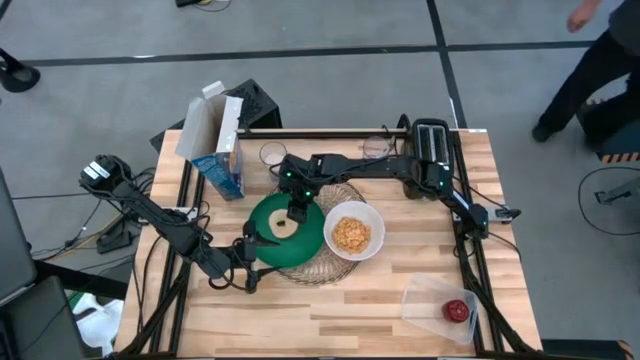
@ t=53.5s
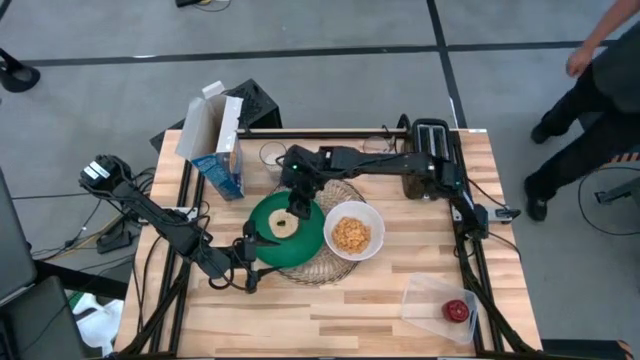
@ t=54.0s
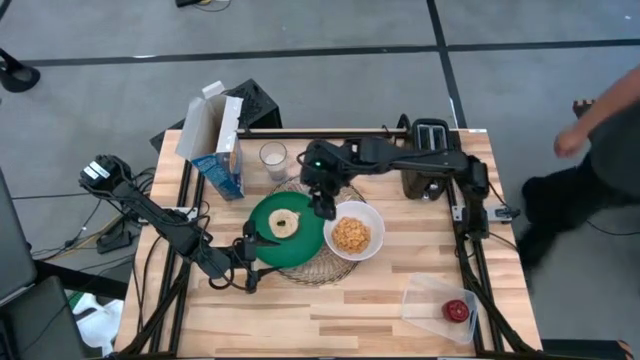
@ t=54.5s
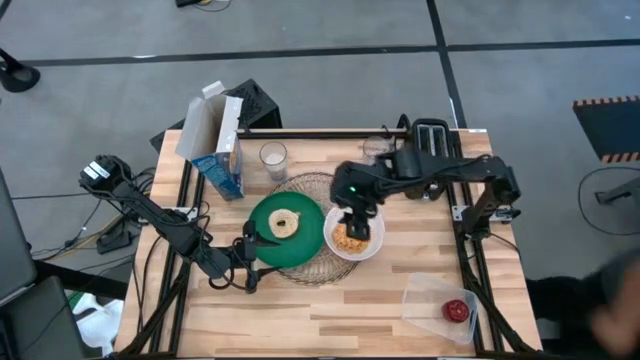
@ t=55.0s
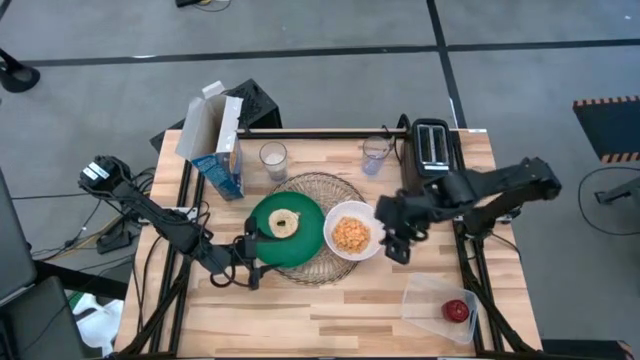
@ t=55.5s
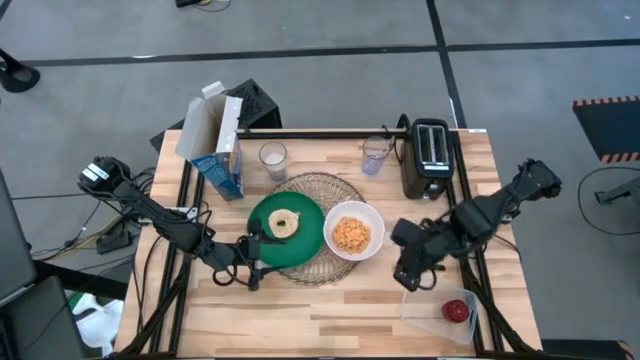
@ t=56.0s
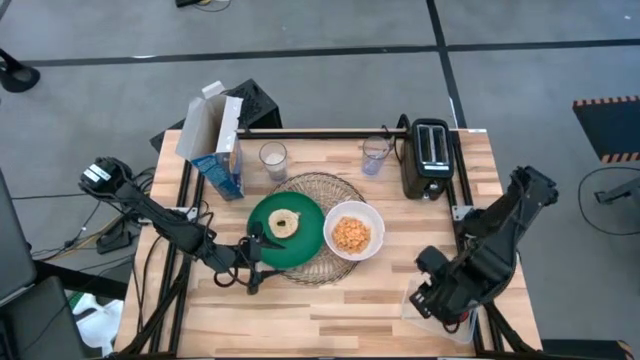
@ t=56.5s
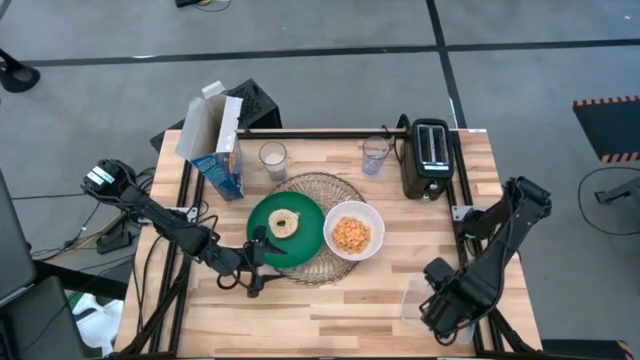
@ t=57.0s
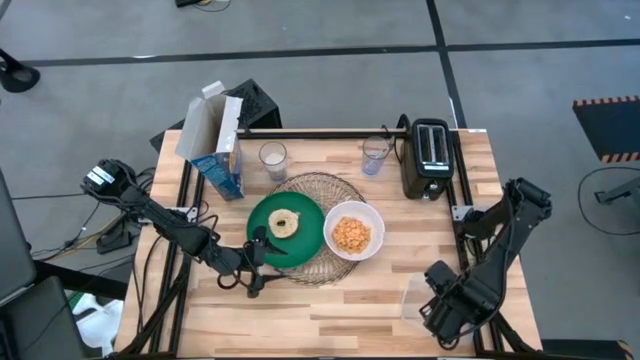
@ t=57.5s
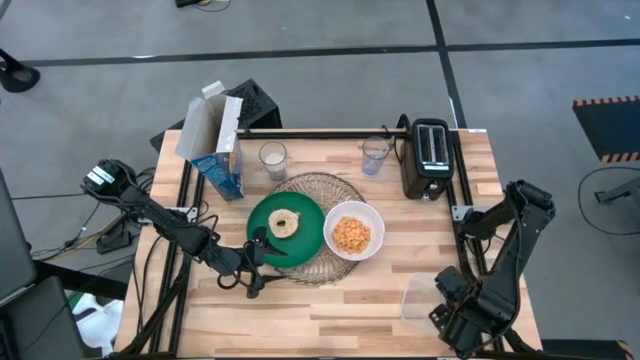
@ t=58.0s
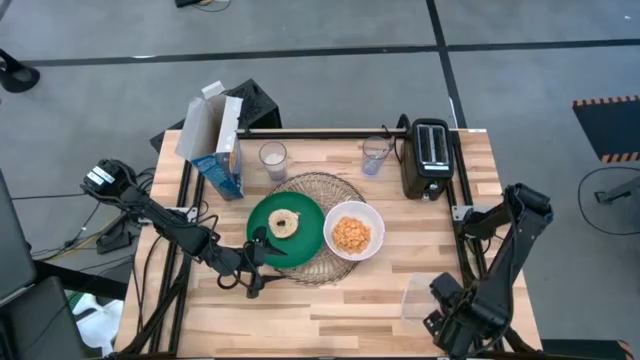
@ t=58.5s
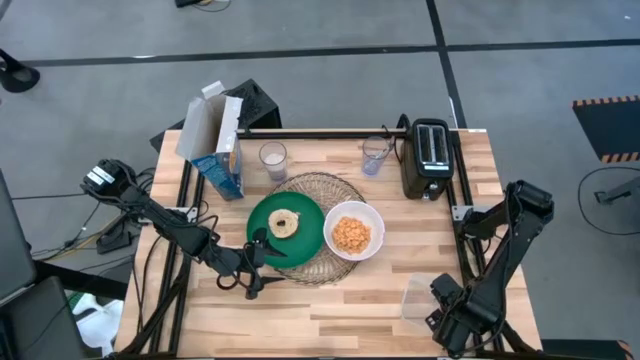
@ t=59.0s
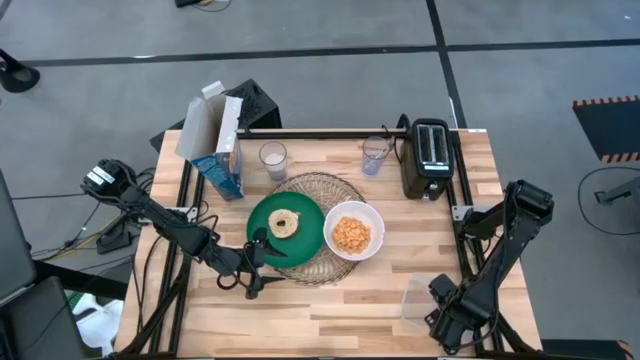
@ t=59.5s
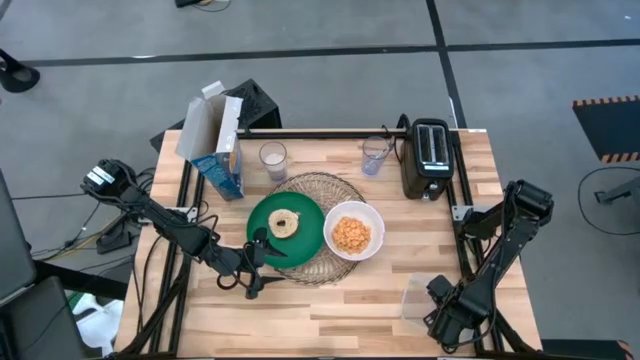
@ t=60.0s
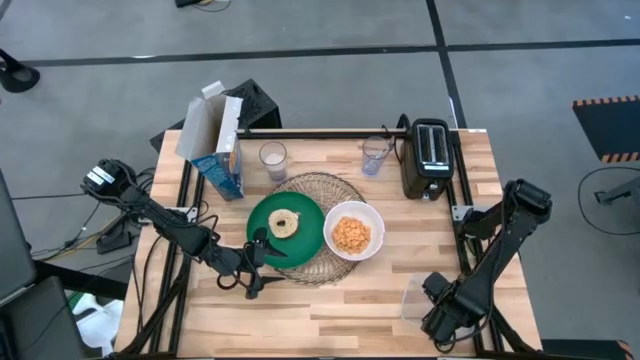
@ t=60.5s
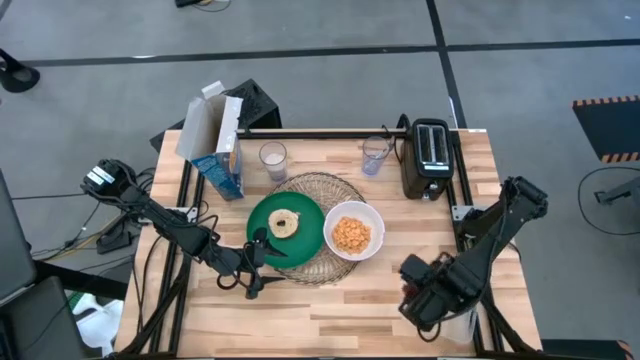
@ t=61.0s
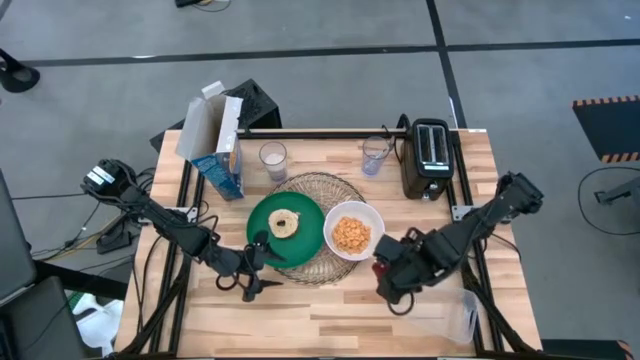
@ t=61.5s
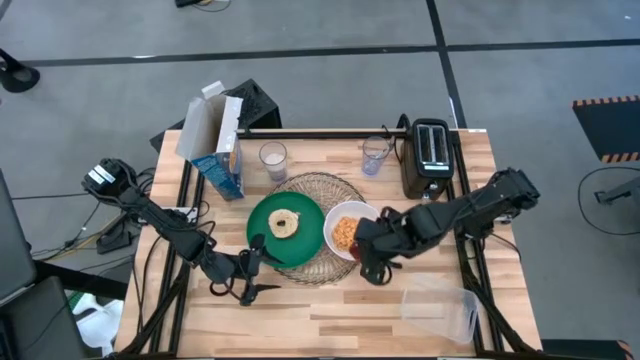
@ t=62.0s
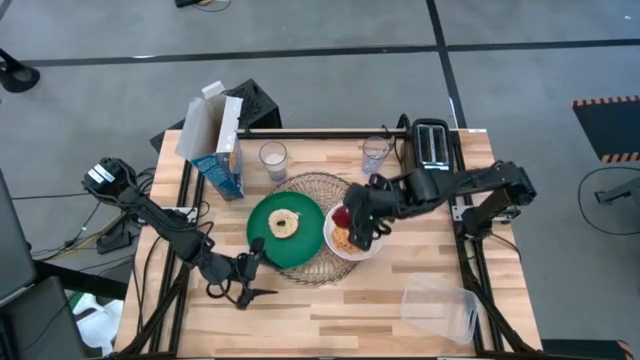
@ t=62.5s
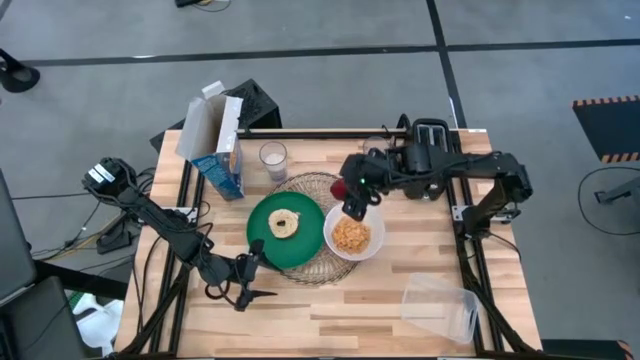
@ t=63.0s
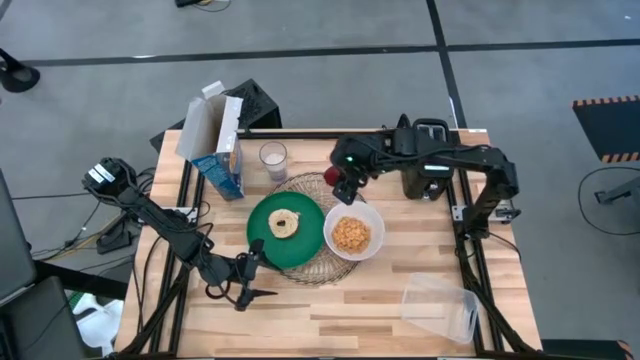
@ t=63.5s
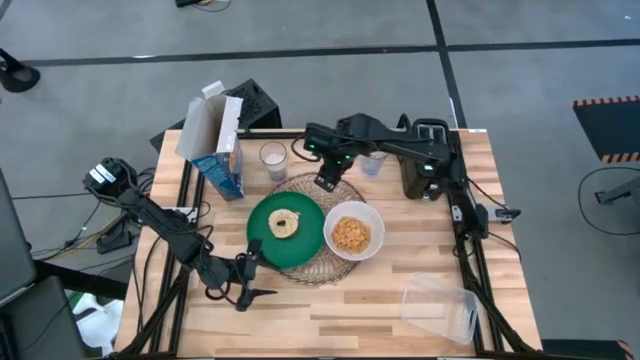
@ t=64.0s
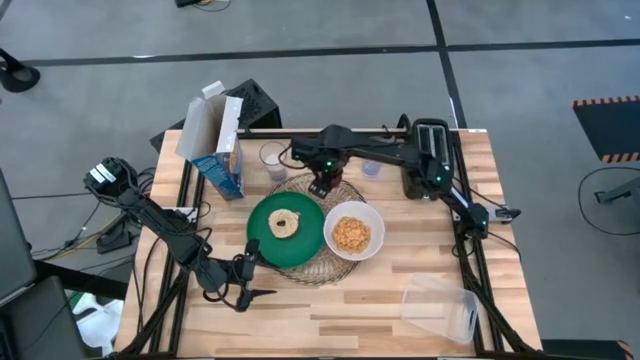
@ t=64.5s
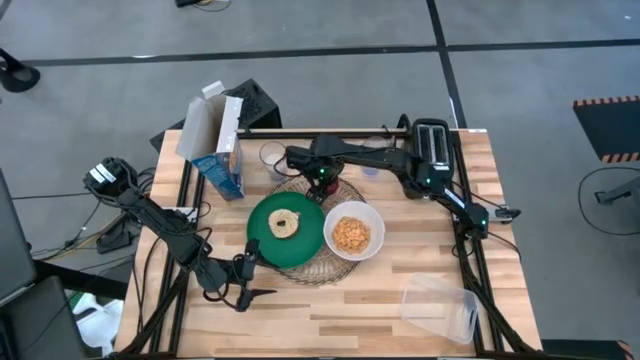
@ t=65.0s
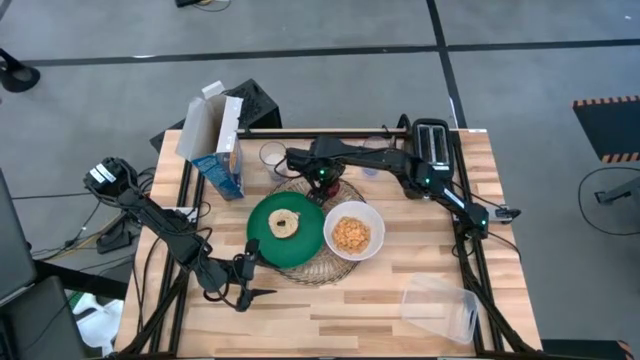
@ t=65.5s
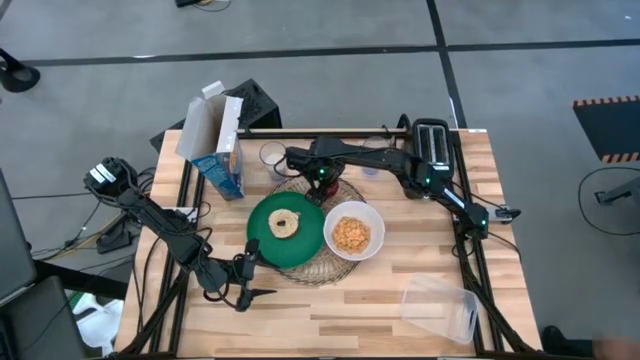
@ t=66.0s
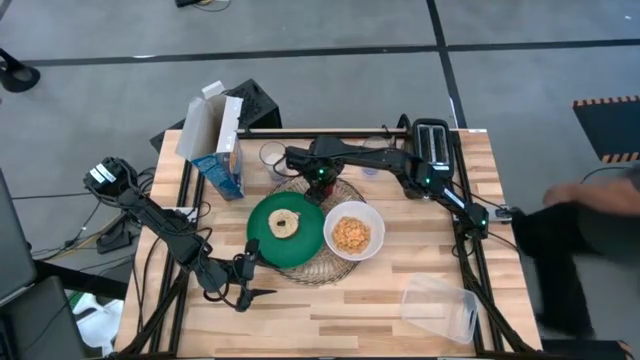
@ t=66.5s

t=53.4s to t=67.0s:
Task: Arrange a breakfast setting
Put the apple on the brown tablemat at the top right of the green plate

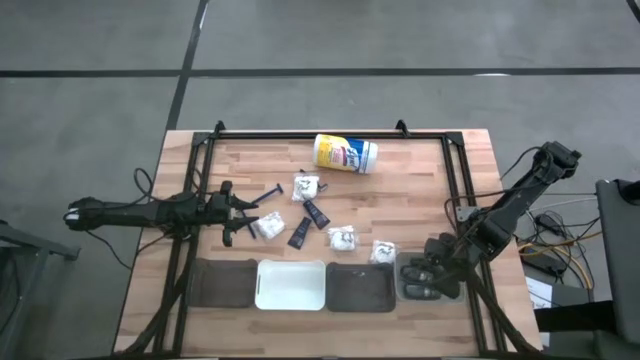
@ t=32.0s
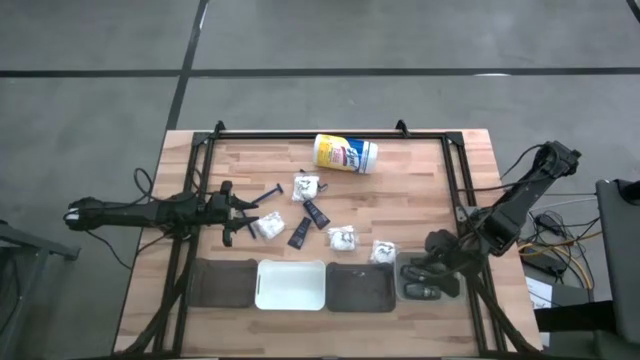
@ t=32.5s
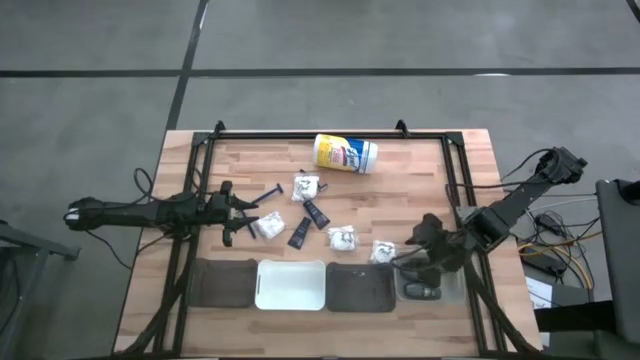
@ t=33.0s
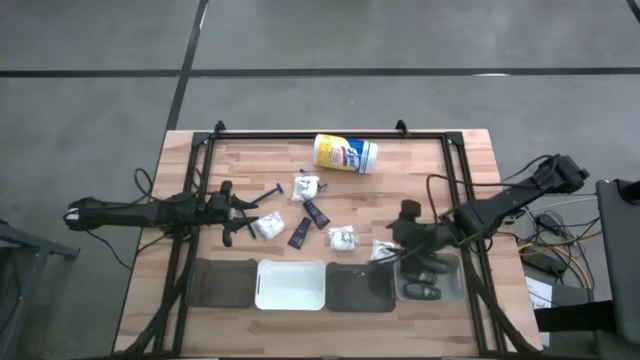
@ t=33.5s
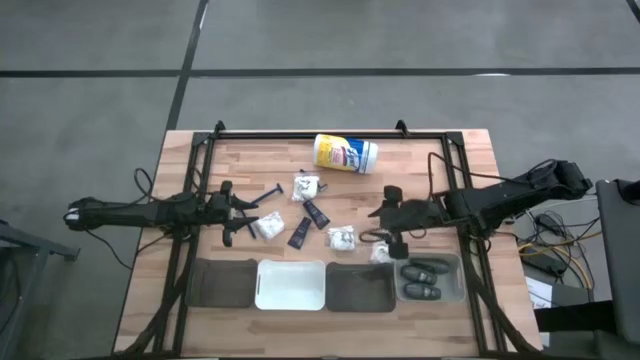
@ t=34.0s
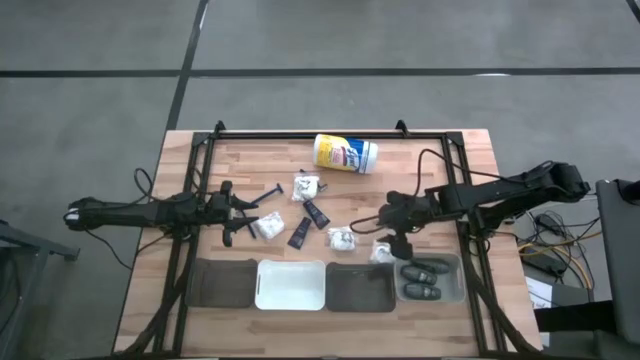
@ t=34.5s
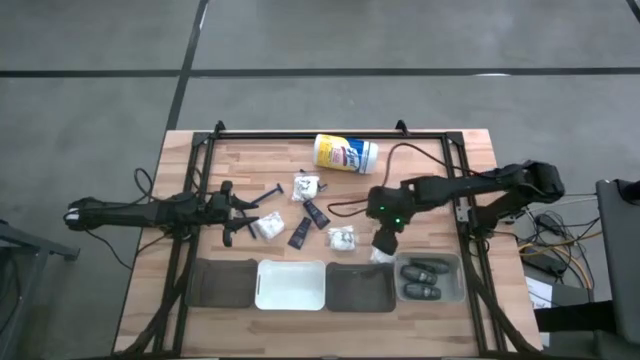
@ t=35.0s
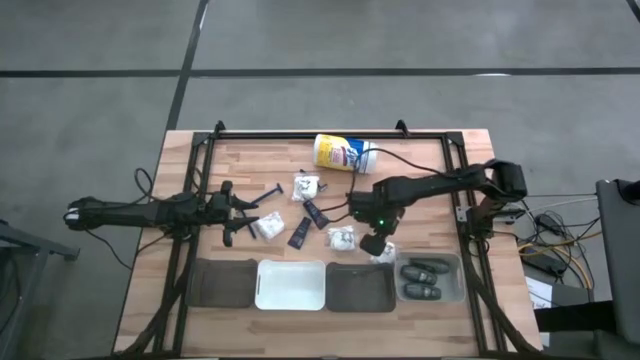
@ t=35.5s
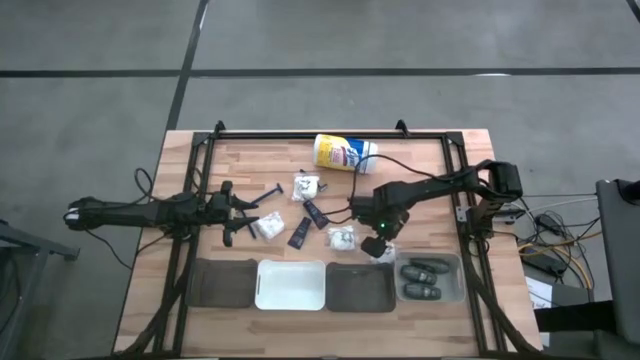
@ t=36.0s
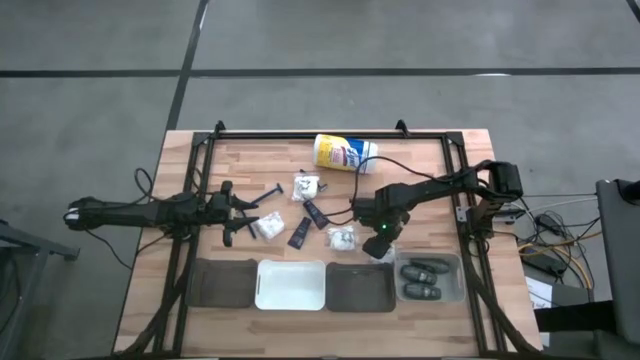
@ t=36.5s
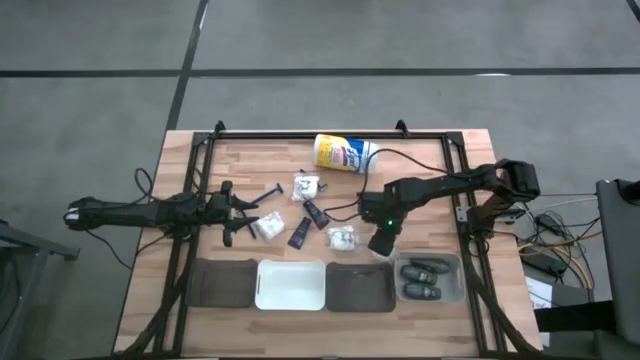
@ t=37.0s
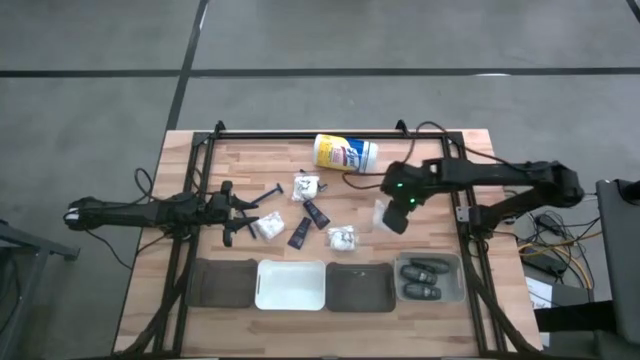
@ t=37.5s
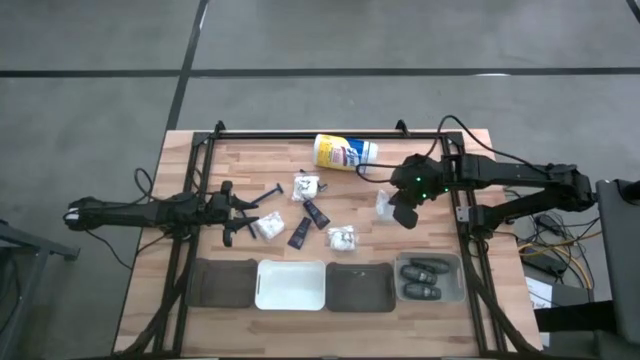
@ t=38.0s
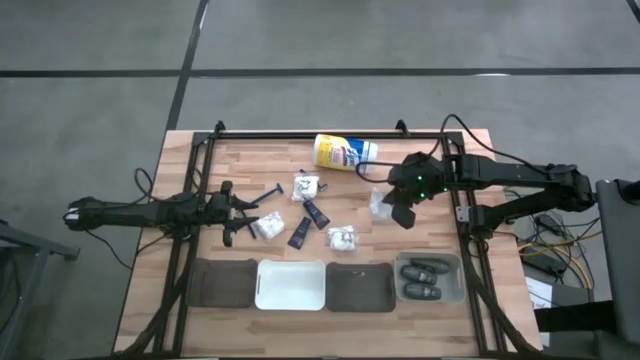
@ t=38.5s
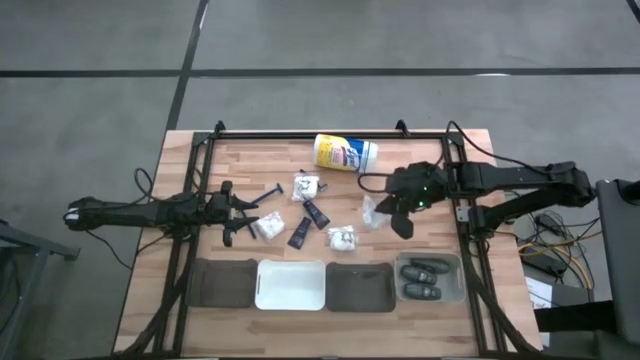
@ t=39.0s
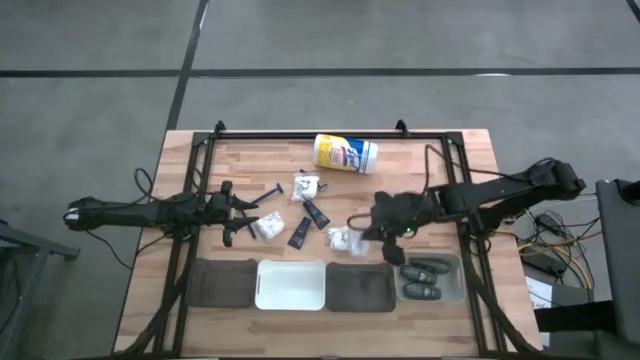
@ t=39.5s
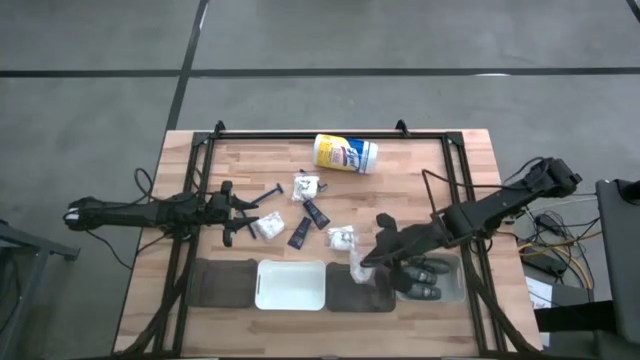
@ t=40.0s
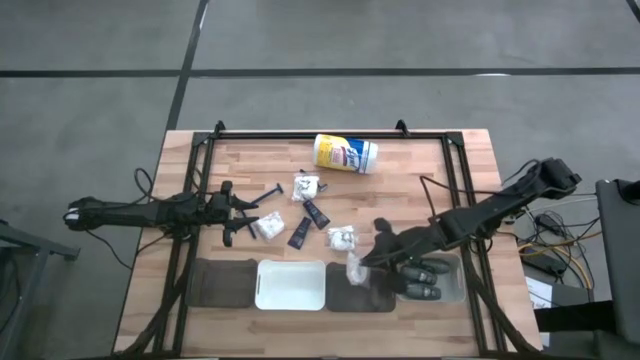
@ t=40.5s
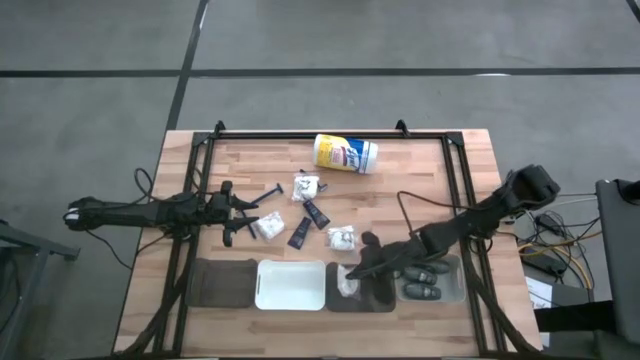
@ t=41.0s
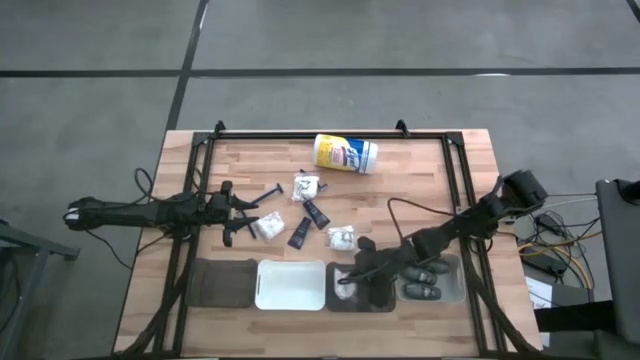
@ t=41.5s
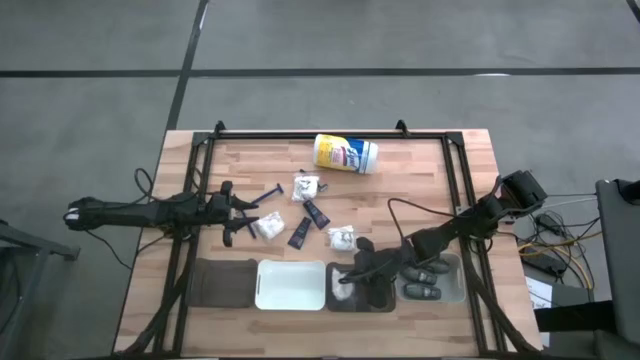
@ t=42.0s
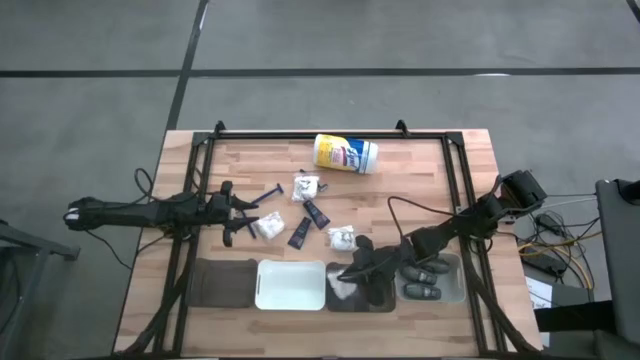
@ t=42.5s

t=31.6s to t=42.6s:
Task: Pick & Place Travel size toiletries
Put the cotton pack into the right black bin
